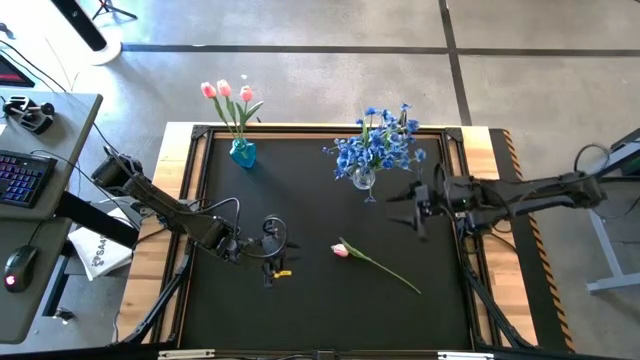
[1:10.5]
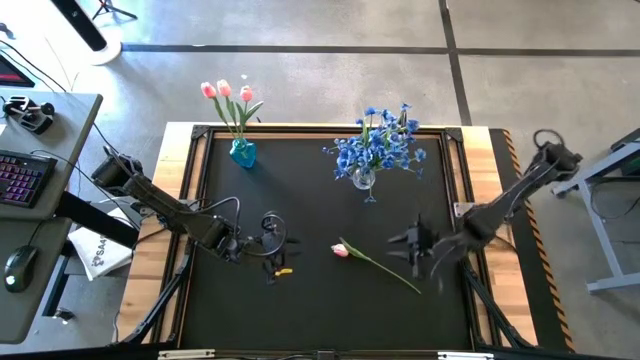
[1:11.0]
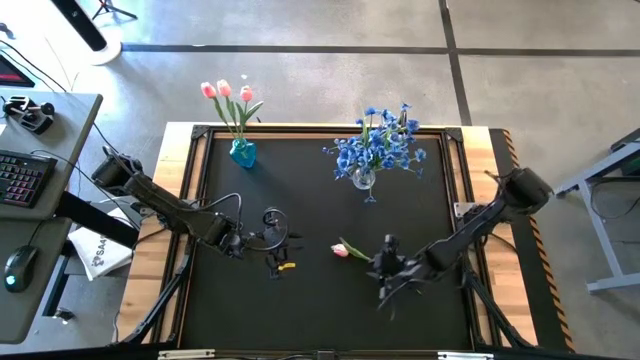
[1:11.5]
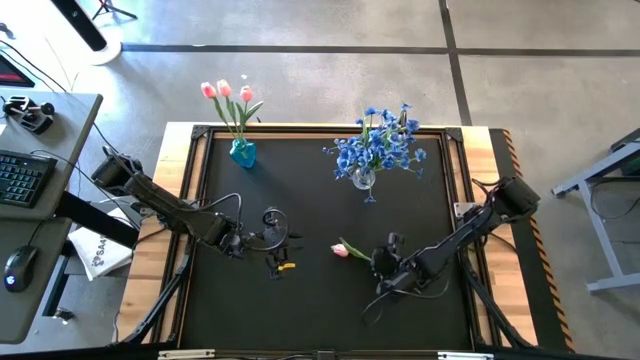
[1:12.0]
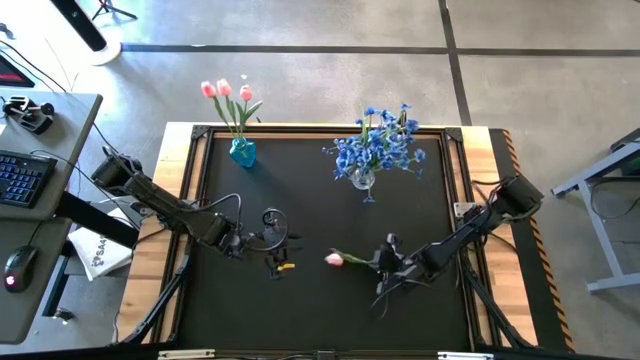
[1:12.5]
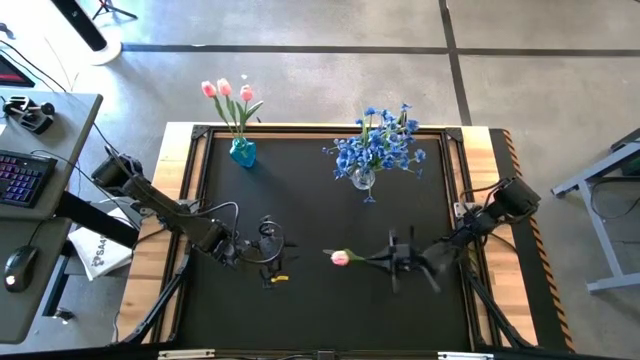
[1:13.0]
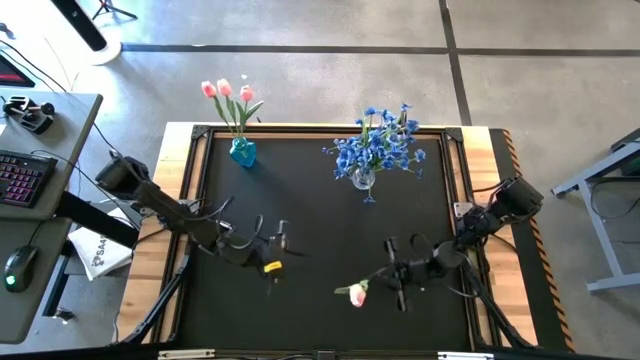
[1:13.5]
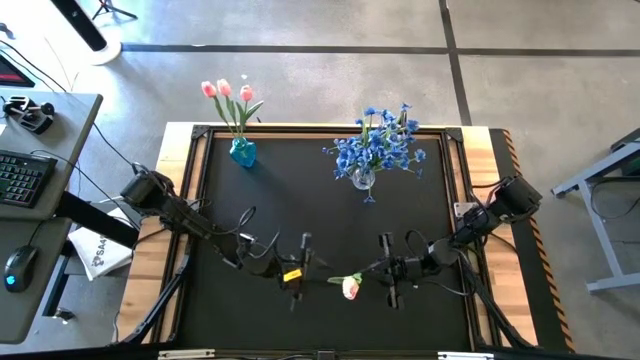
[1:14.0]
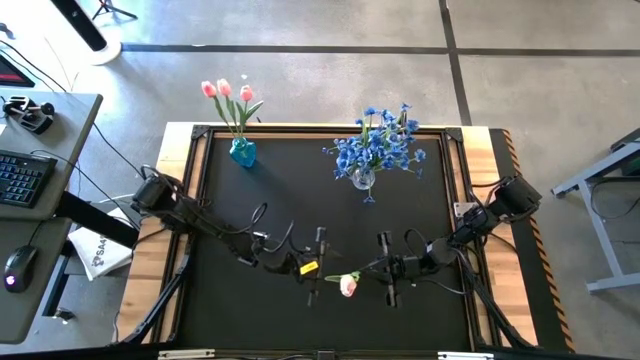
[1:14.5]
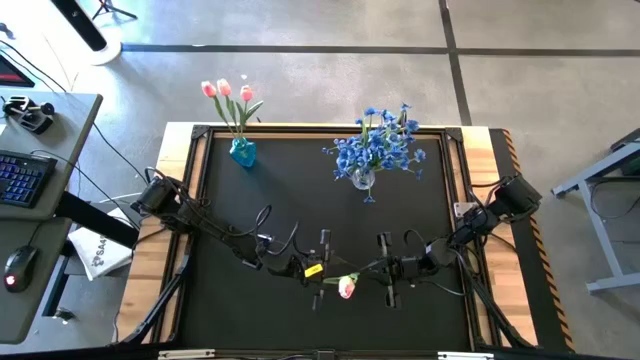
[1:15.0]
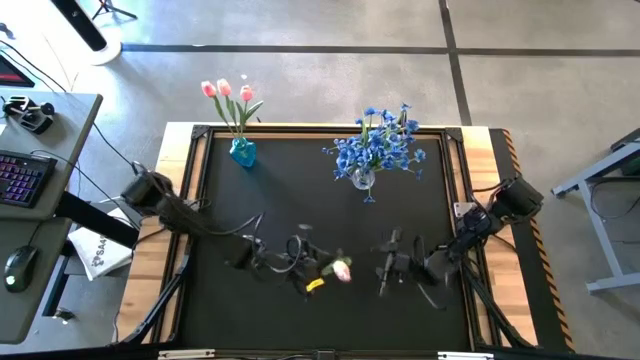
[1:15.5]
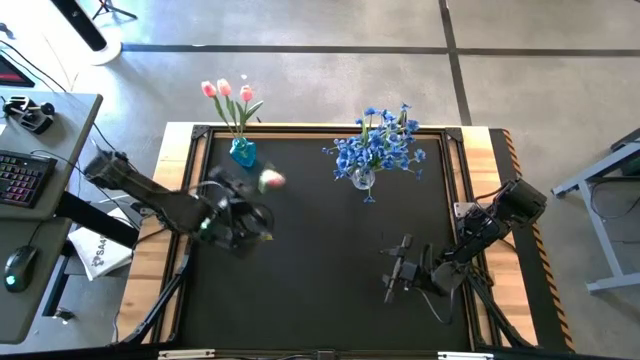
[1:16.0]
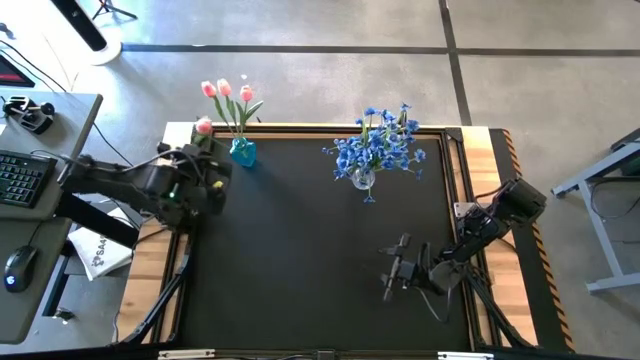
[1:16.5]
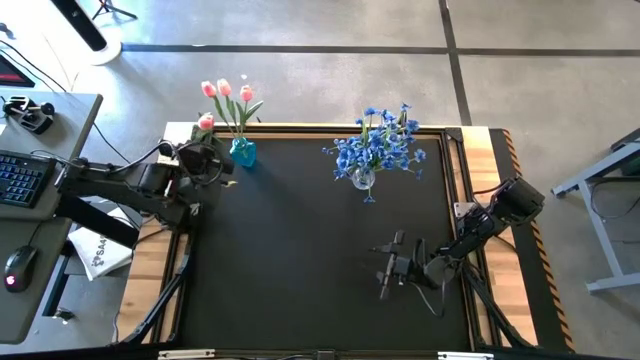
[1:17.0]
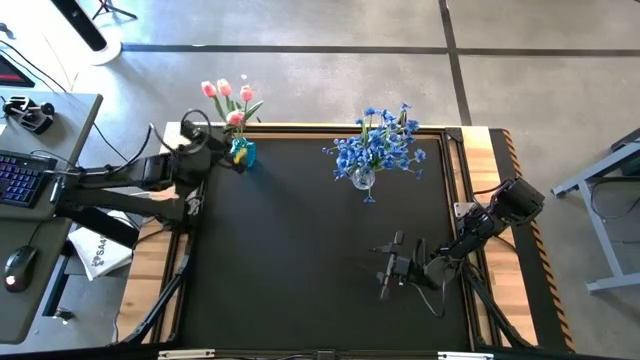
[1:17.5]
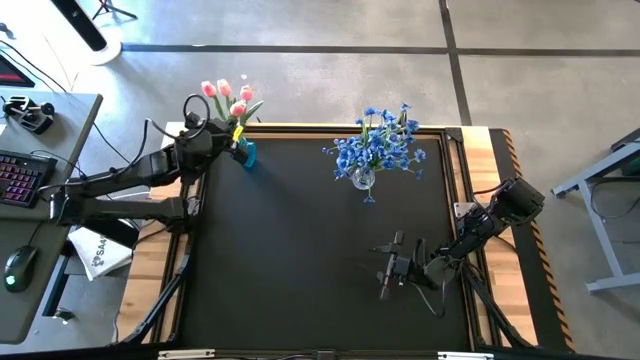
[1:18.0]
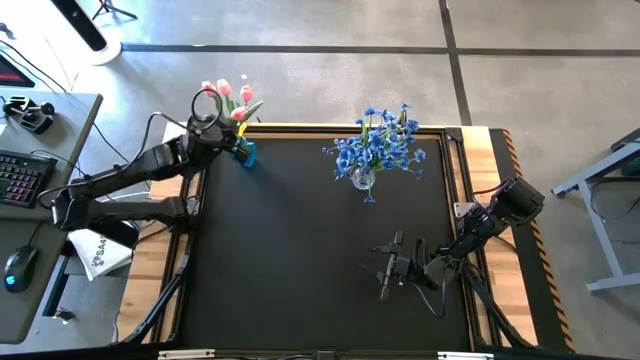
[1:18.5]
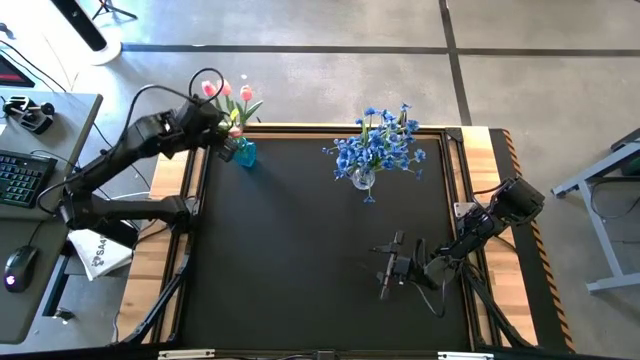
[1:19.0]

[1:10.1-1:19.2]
Task: Sort flowers into vase by color
Put the pink flower into the blue vase

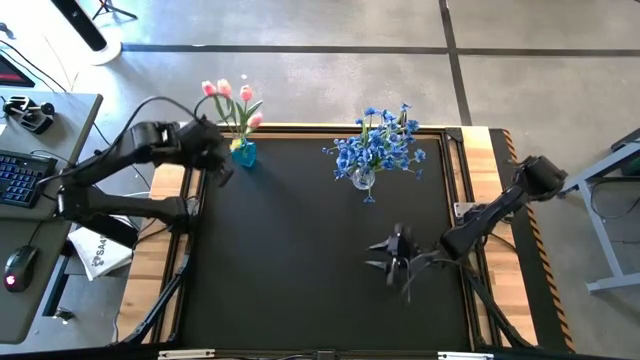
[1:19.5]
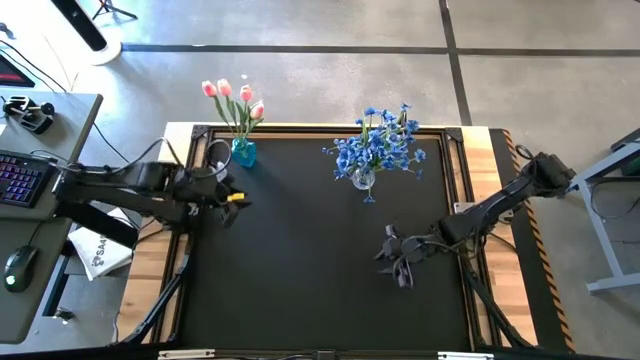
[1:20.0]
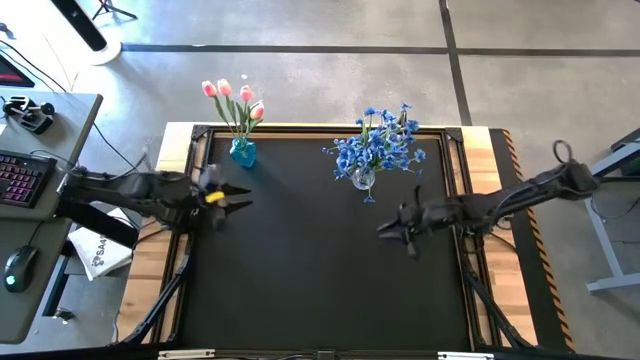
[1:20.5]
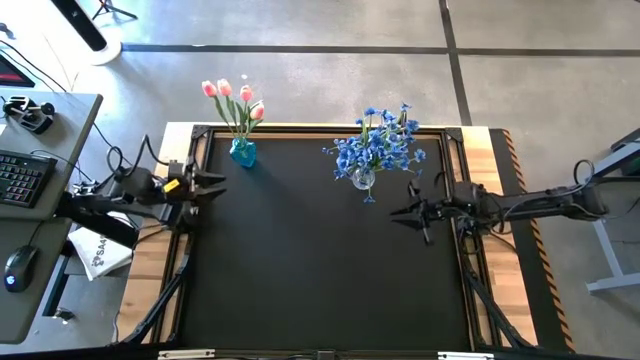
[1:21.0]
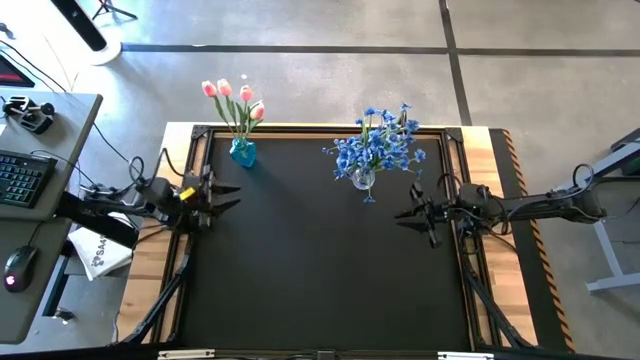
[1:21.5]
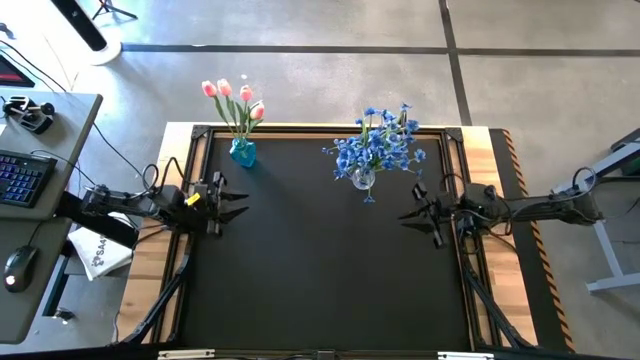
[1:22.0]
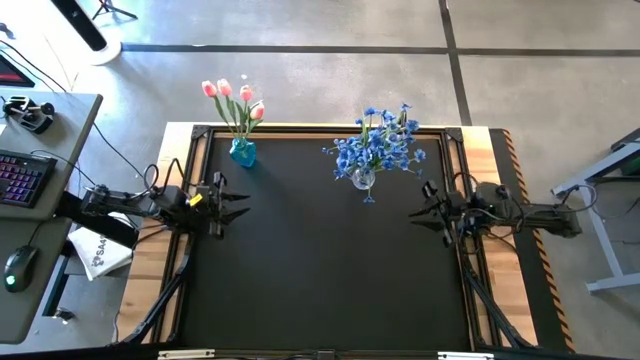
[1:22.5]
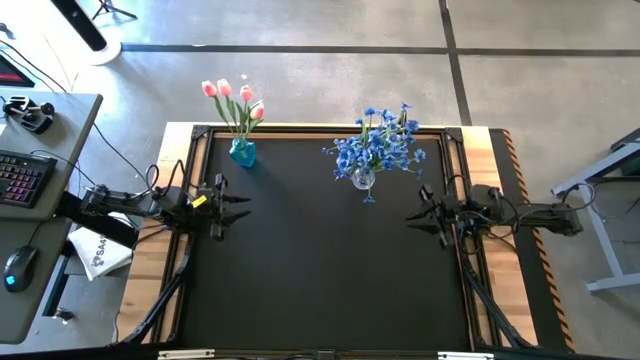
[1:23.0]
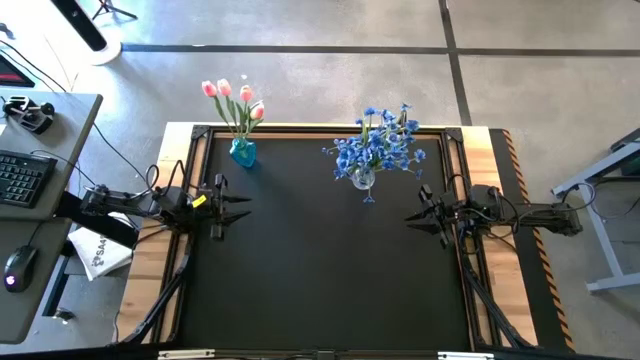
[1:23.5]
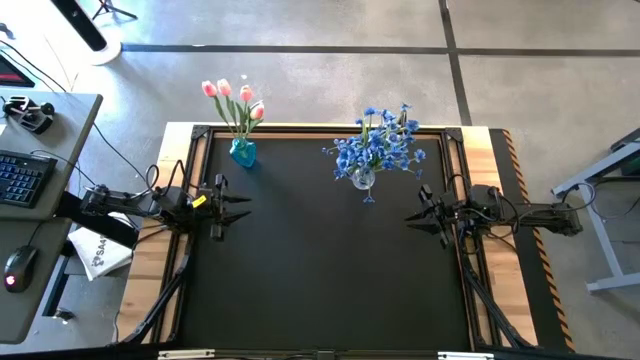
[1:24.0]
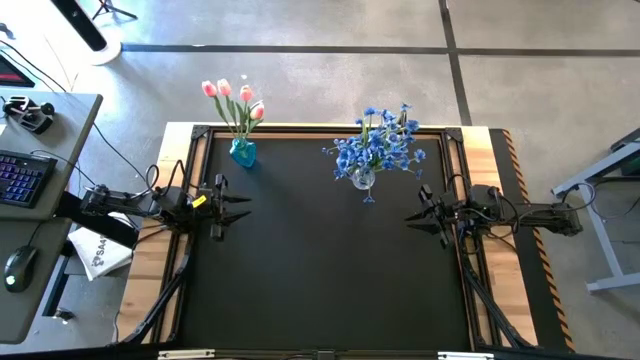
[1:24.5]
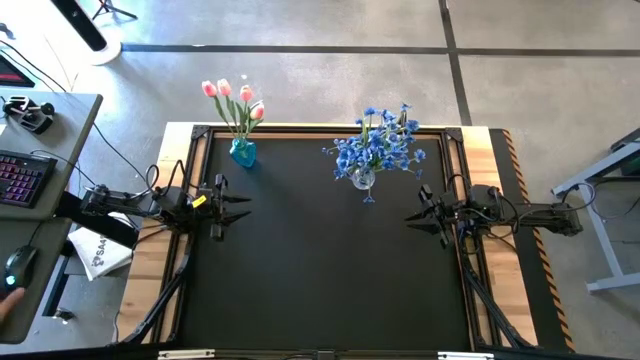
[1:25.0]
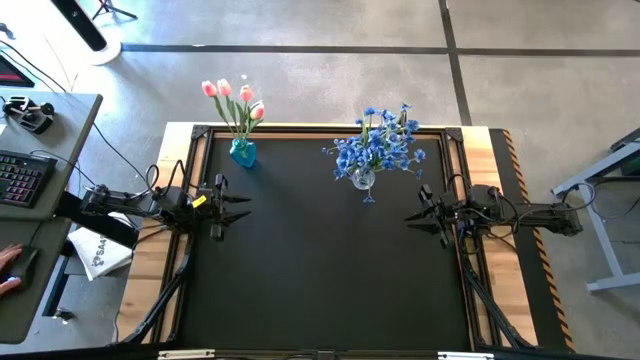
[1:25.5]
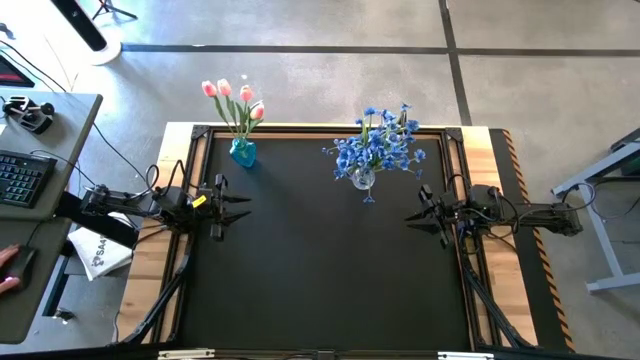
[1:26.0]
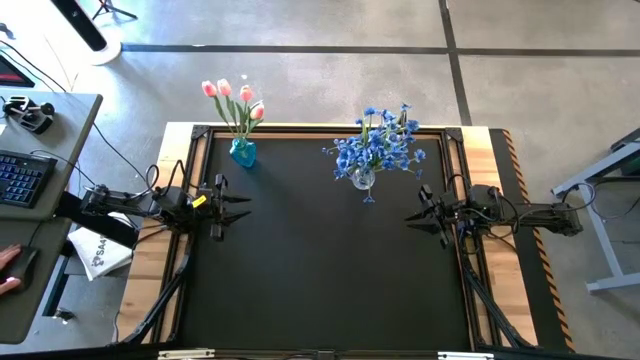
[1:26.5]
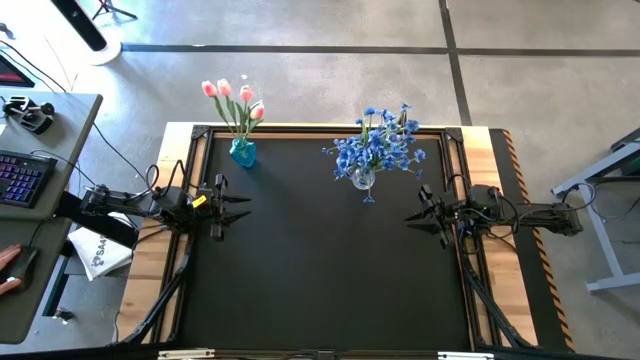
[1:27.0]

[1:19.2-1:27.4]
Return to Home Position

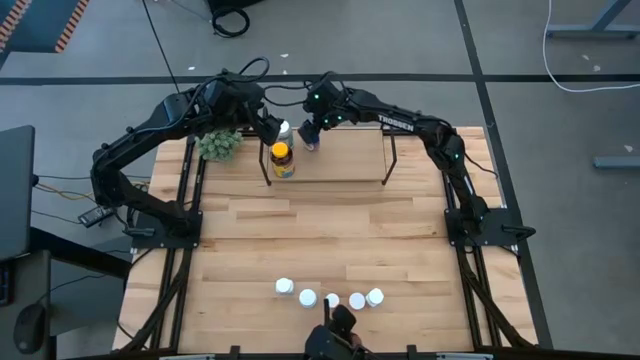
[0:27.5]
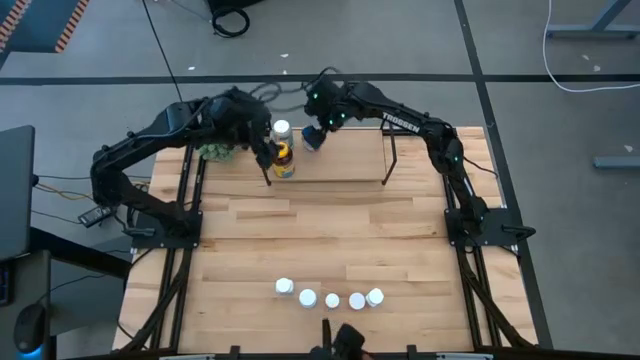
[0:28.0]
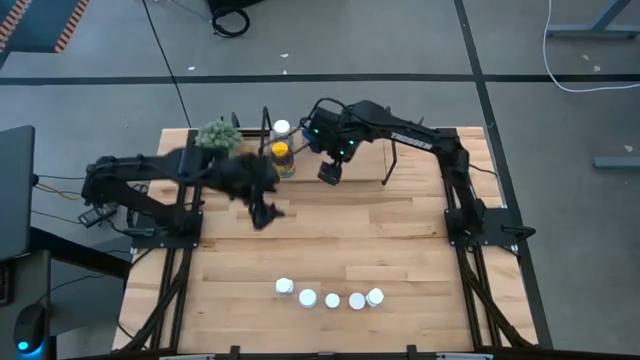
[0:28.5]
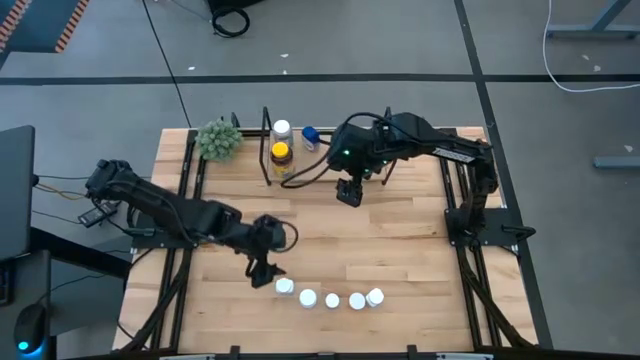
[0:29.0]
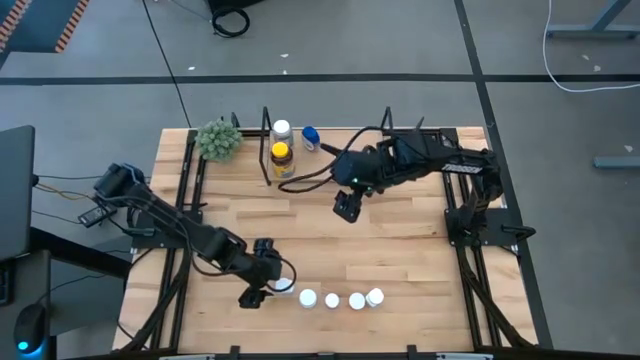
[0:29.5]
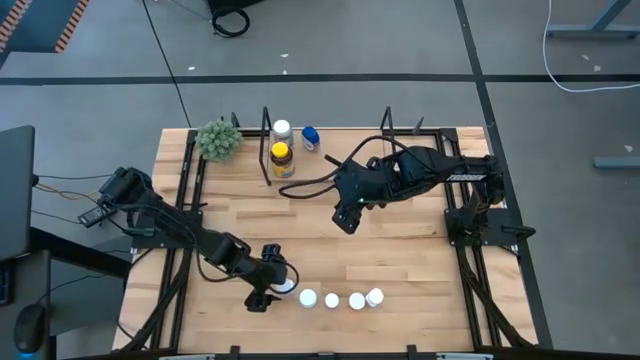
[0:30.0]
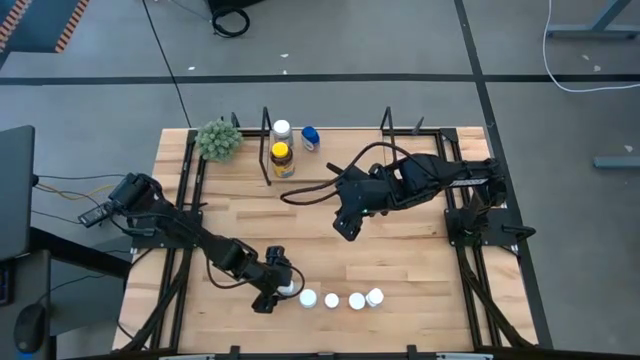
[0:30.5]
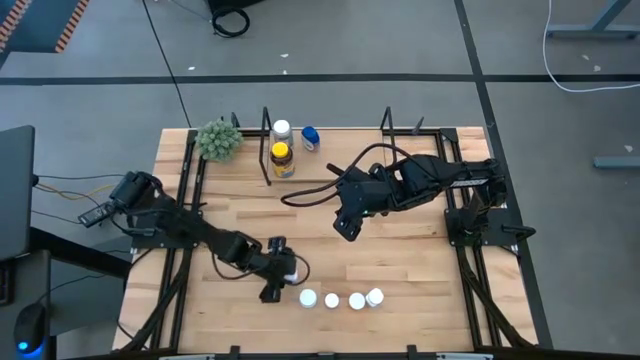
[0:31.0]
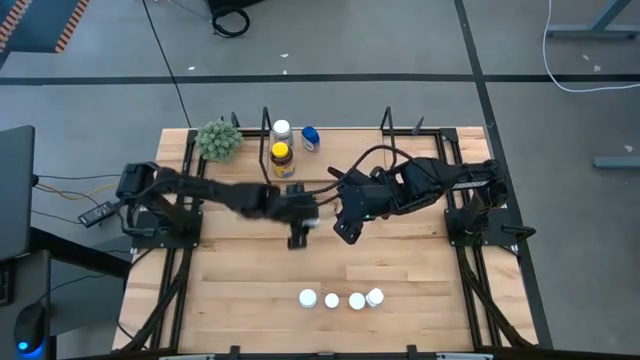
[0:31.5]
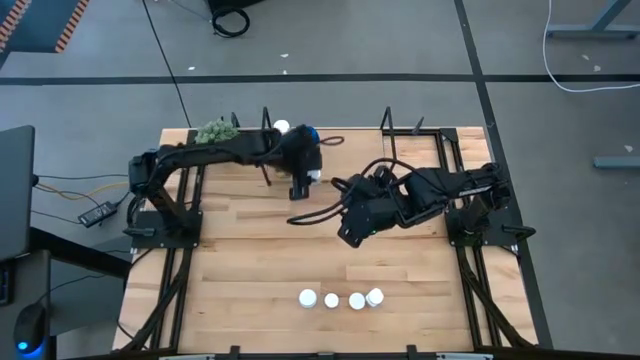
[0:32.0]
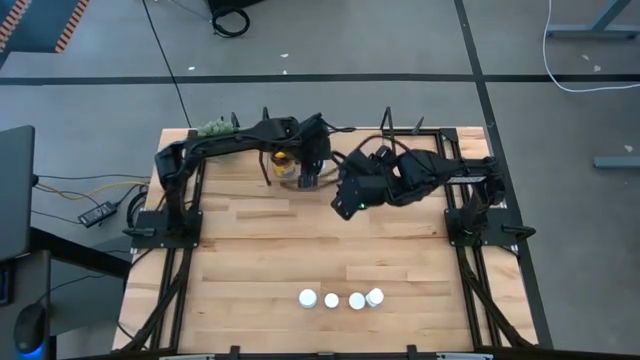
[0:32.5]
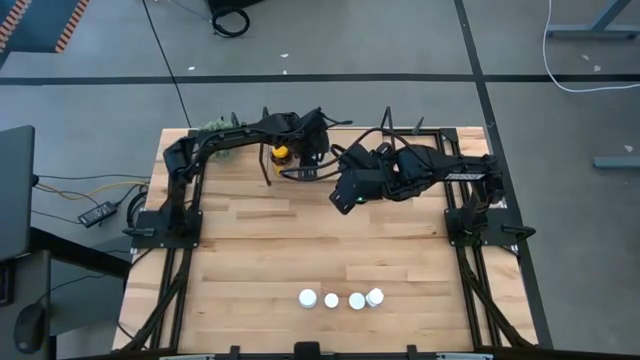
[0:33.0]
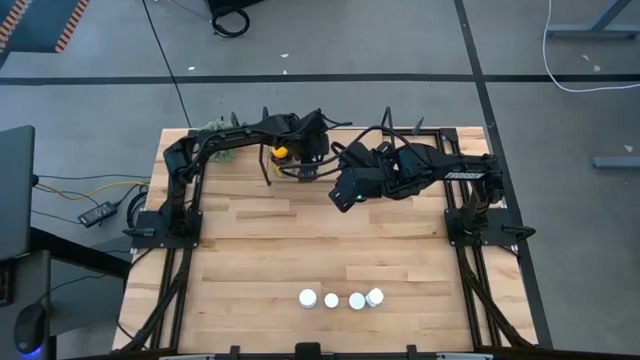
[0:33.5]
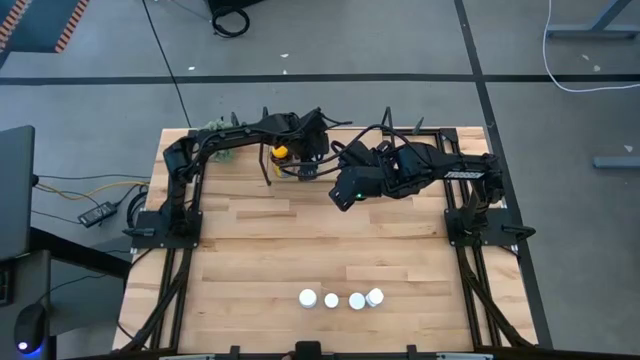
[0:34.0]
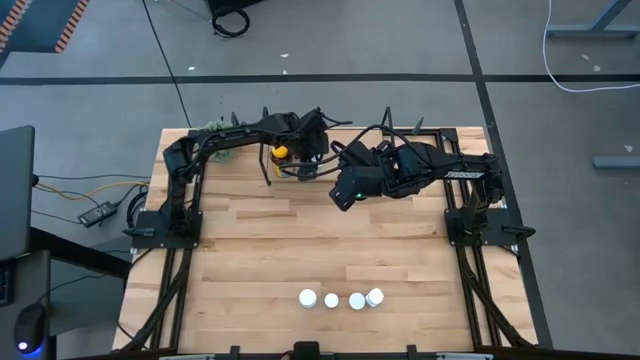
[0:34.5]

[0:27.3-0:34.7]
Task: Pick and place medicine bottles onto shelf by color
Put the white and blue medicine bottle on the shelf
